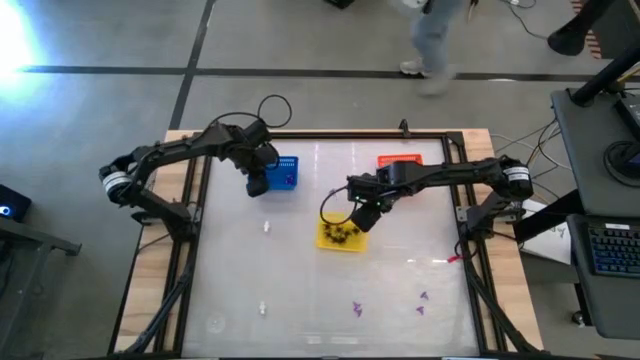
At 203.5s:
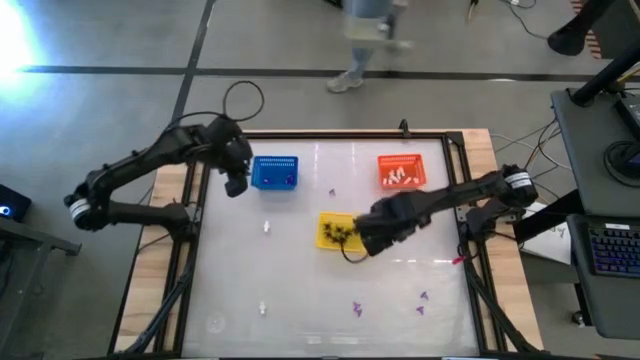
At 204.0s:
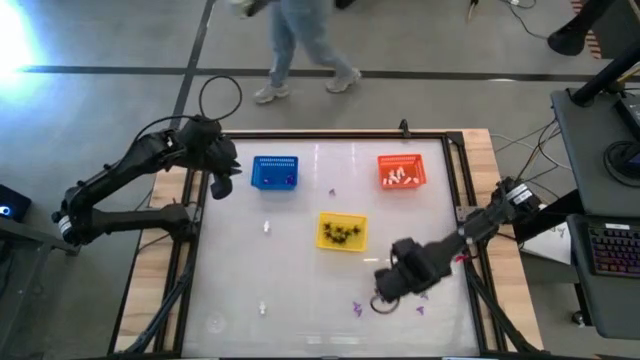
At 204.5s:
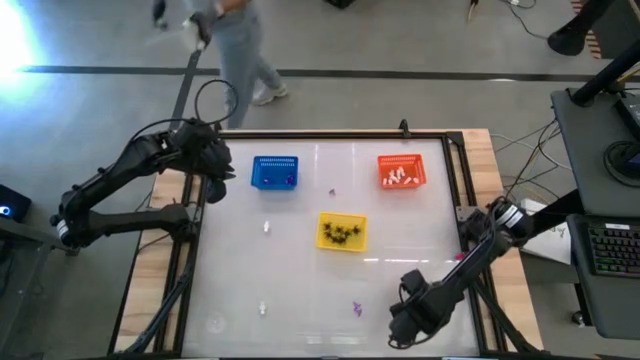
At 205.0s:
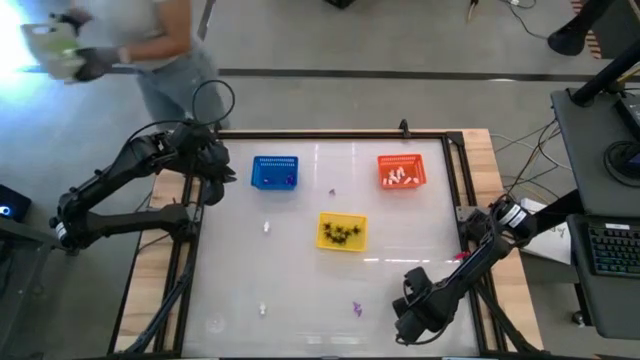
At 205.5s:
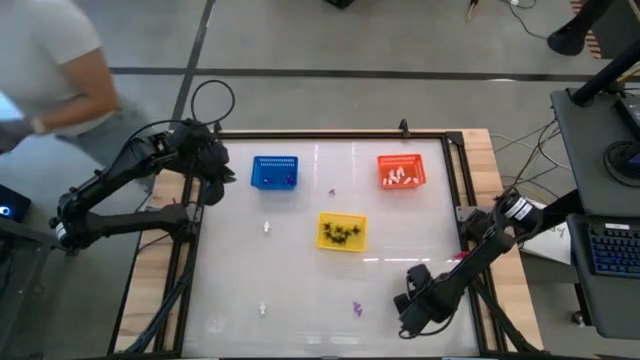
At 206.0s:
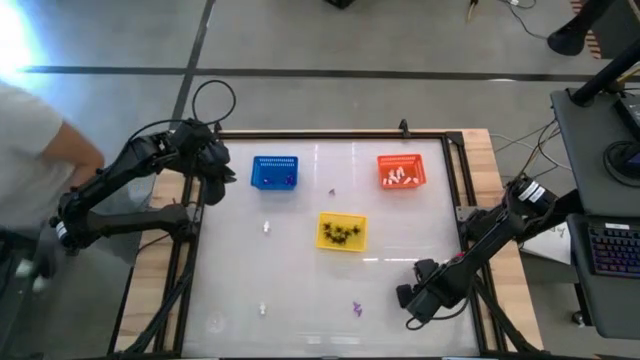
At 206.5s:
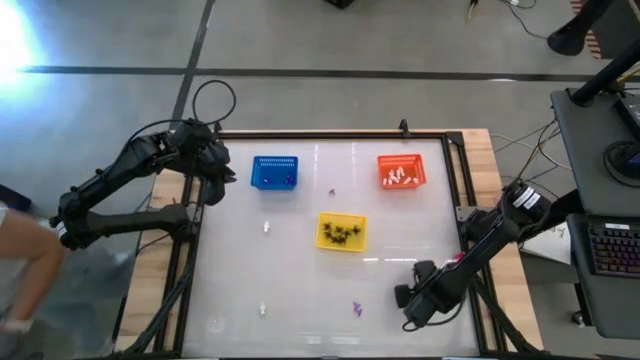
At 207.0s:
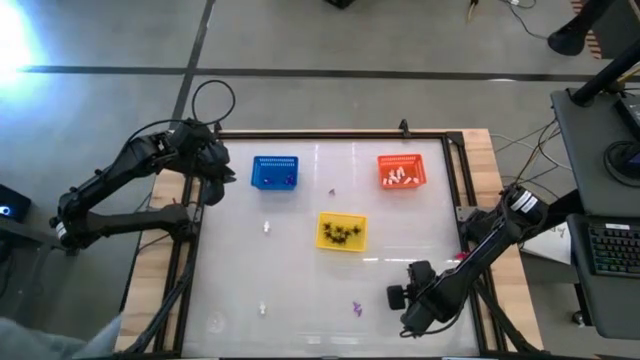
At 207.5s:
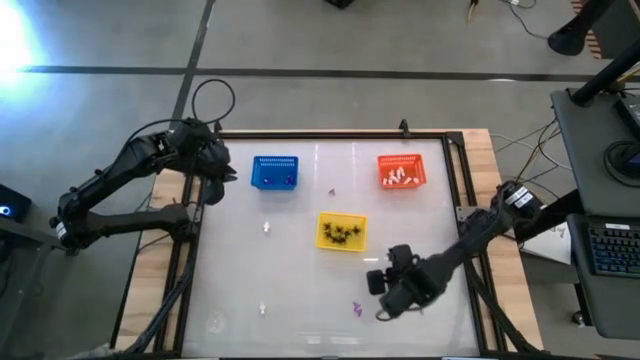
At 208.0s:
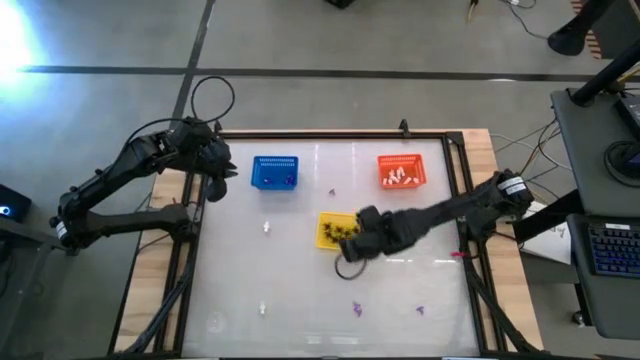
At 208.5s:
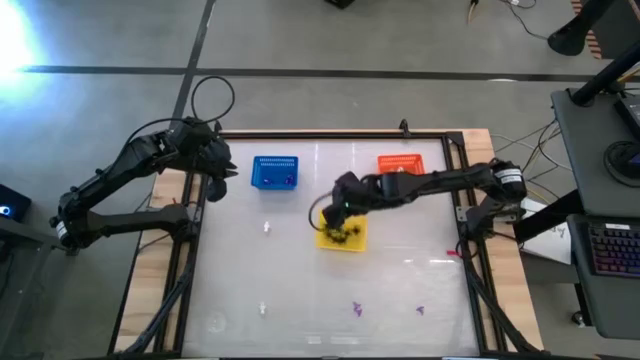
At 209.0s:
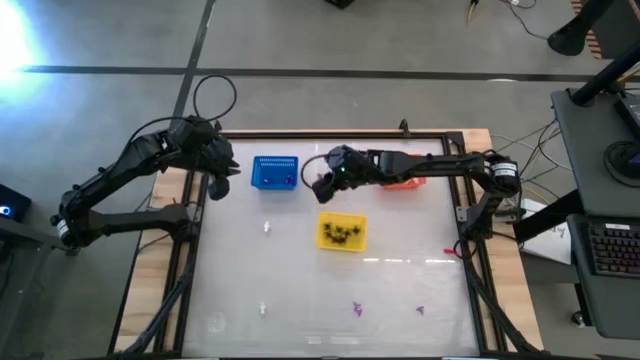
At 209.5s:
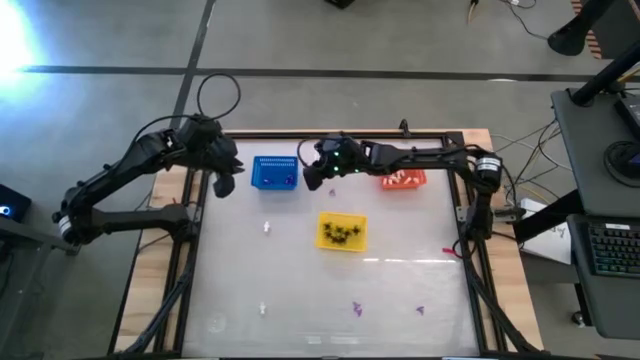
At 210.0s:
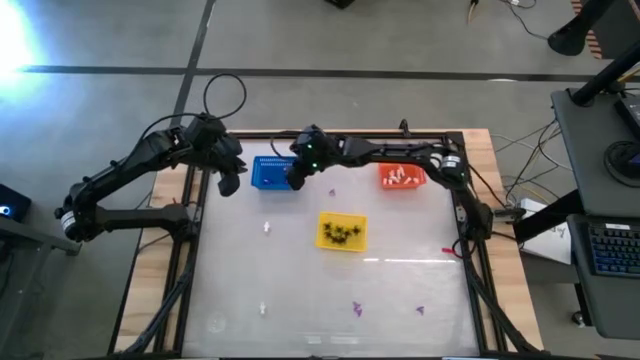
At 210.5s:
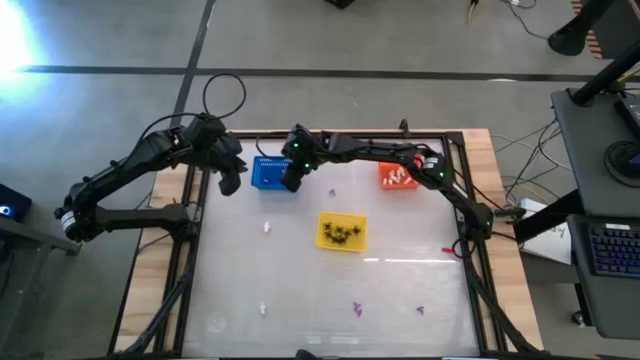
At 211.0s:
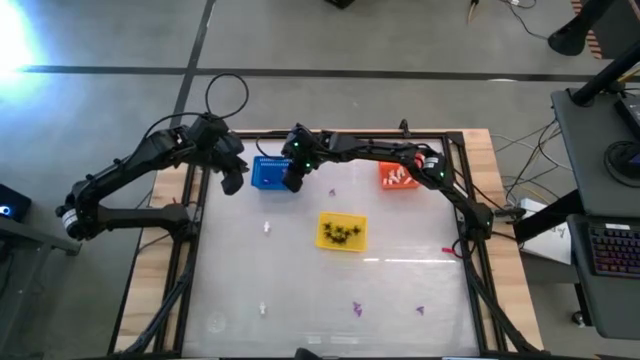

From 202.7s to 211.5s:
Task: Sort Halloween decoration
Put the purple witch hat toy into the blue bin

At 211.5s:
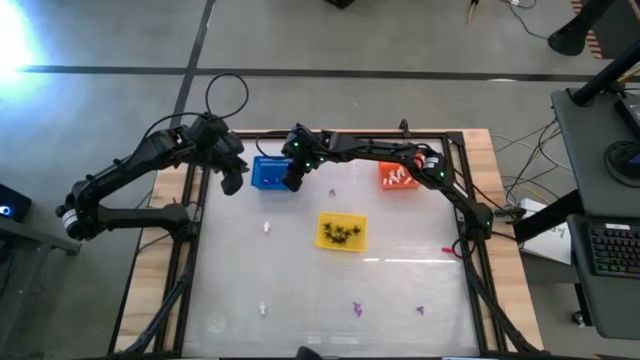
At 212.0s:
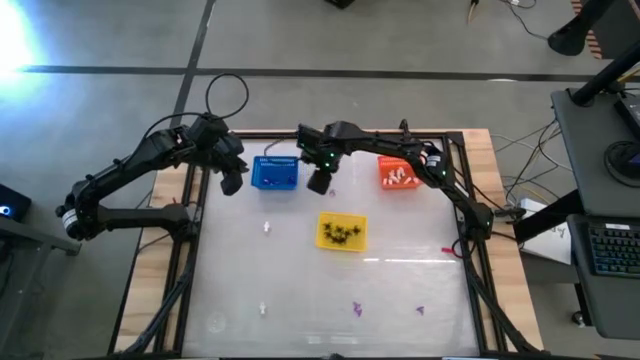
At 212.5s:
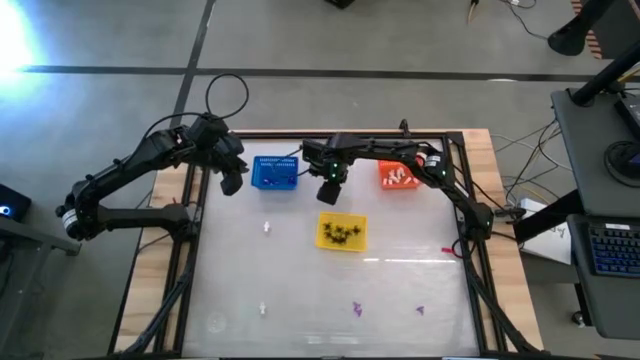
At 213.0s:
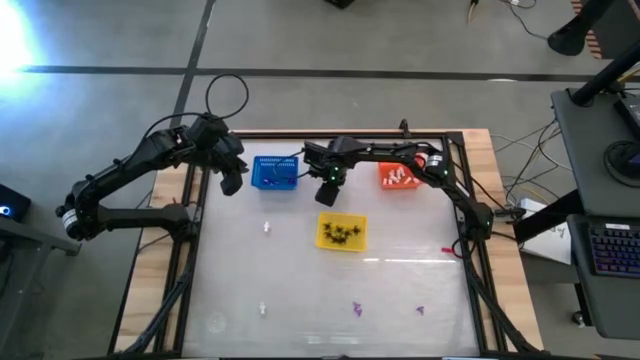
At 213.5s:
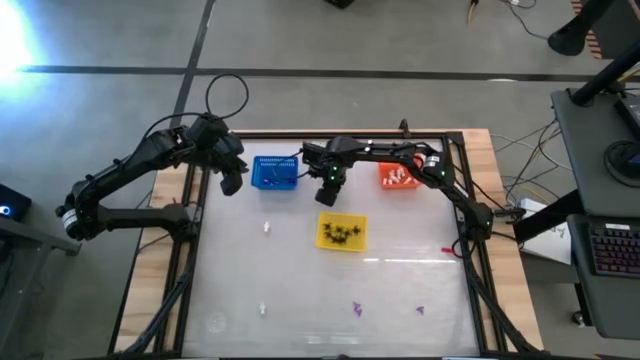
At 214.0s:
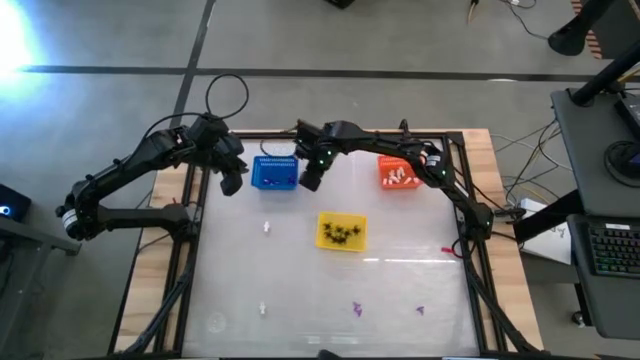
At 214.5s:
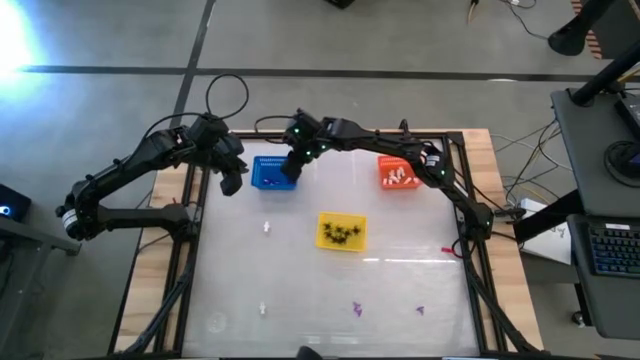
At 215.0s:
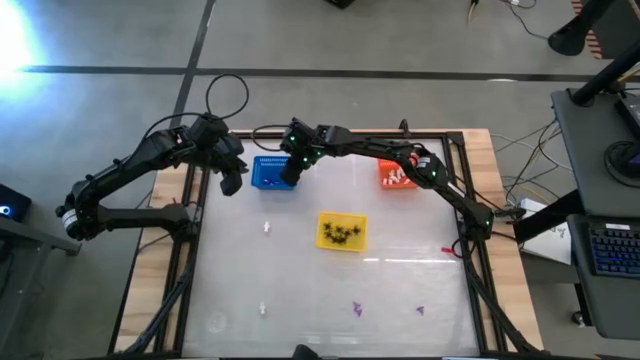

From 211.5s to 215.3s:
Put the purple witch hat toy into the blue bin

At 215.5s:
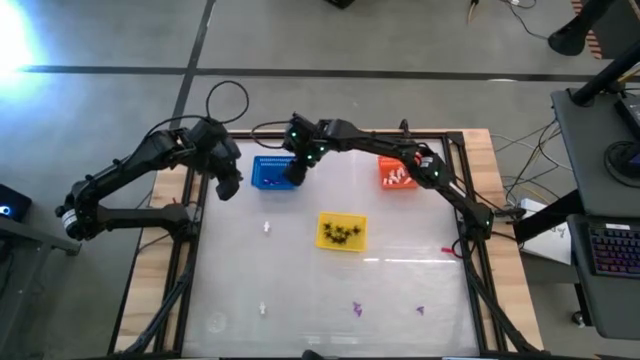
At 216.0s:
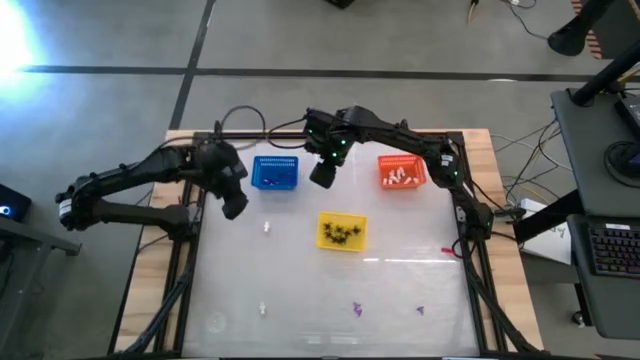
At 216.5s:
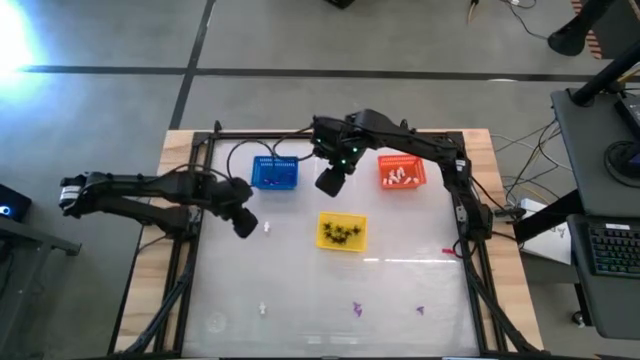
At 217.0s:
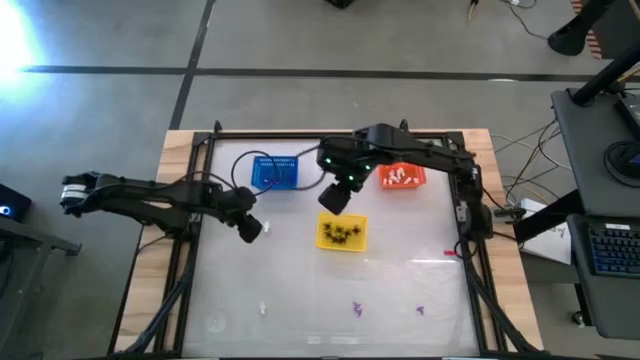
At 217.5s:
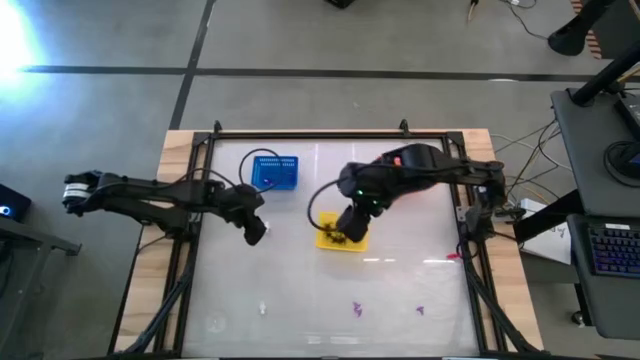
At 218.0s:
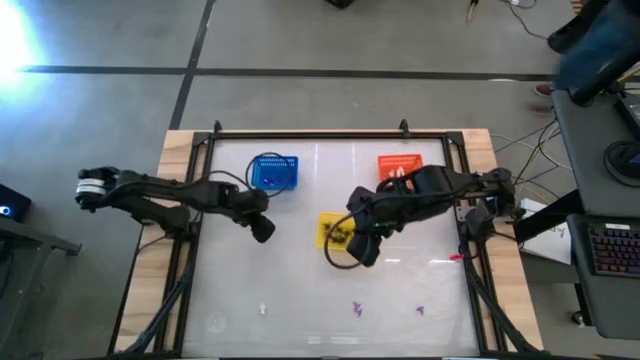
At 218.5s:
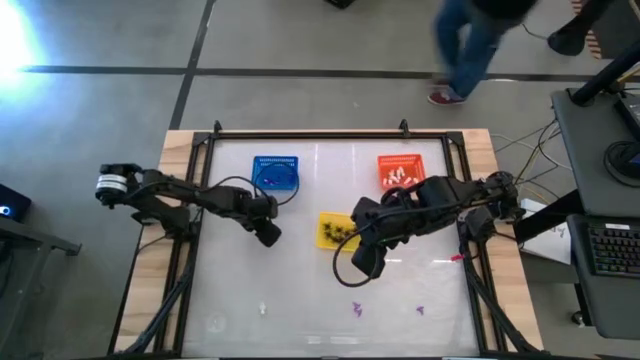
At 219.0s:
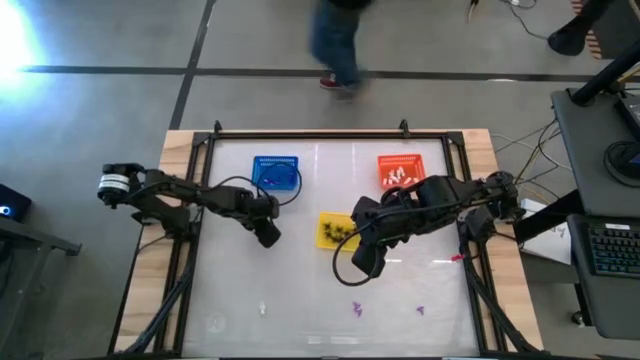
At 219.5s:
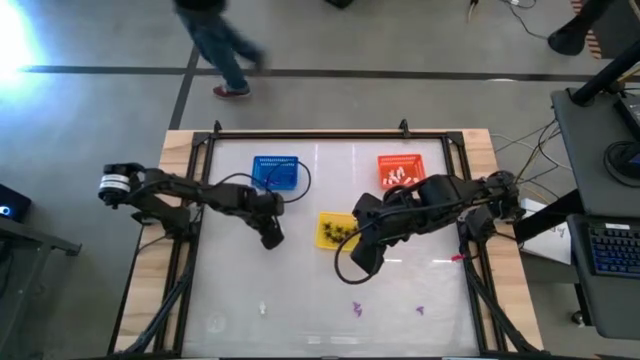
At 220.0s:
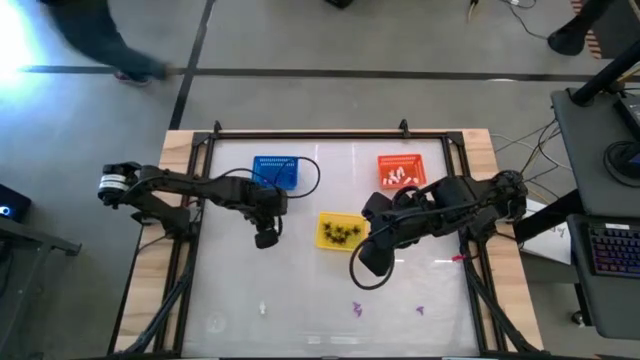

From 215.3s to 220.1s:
Put the white skeleton toy into the orange bin

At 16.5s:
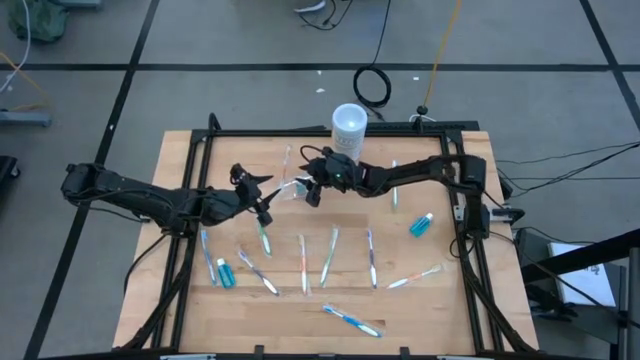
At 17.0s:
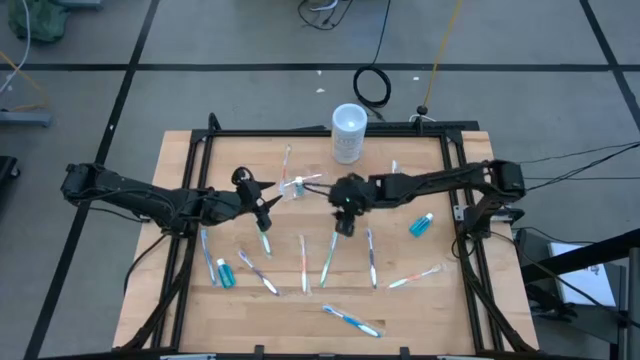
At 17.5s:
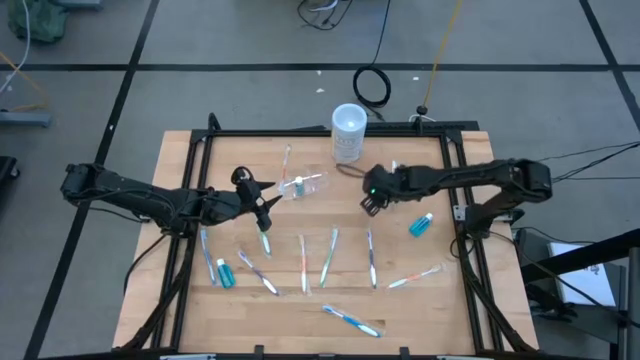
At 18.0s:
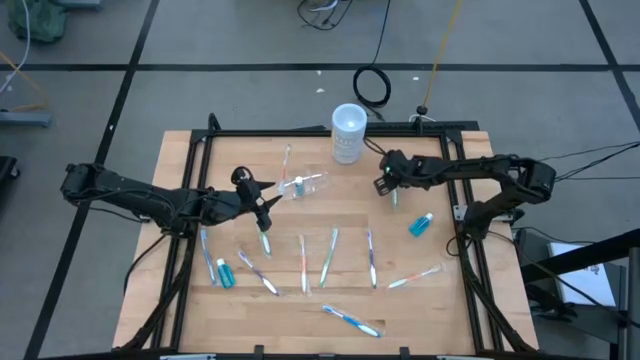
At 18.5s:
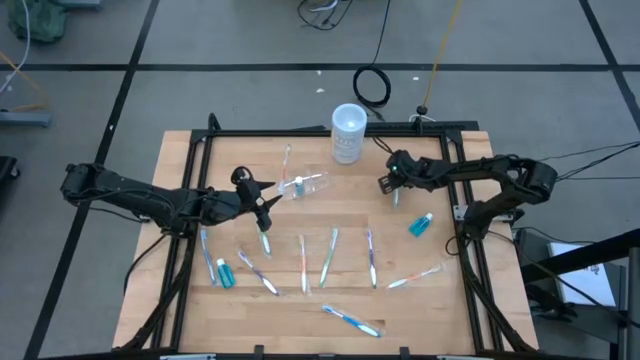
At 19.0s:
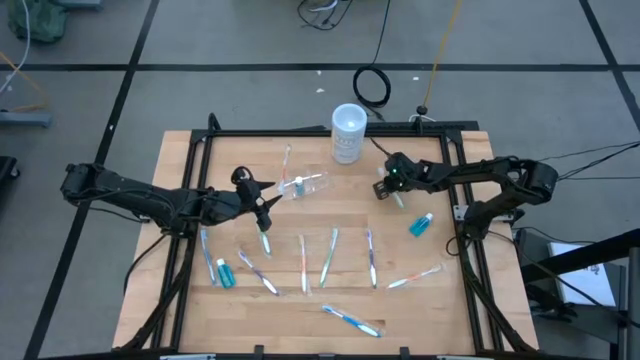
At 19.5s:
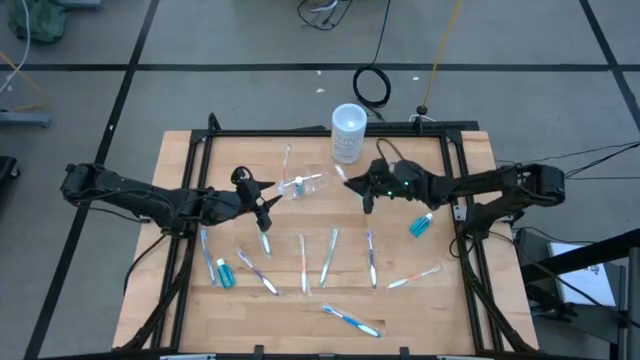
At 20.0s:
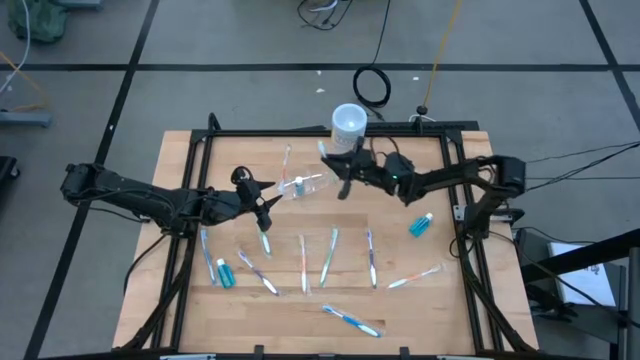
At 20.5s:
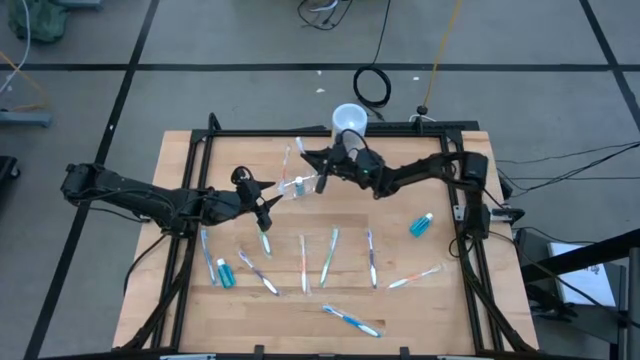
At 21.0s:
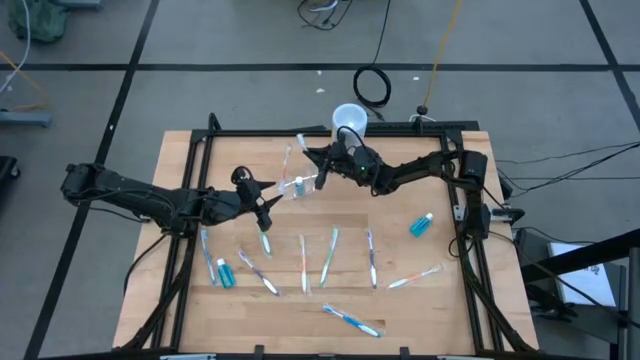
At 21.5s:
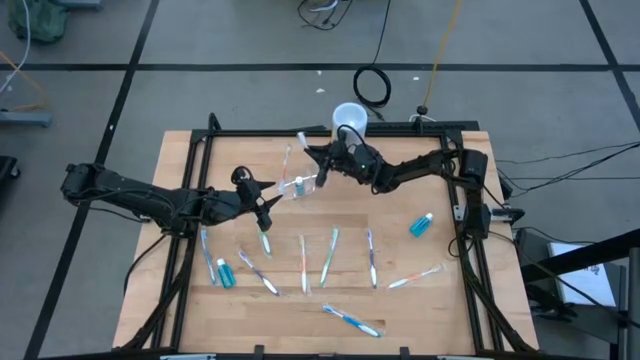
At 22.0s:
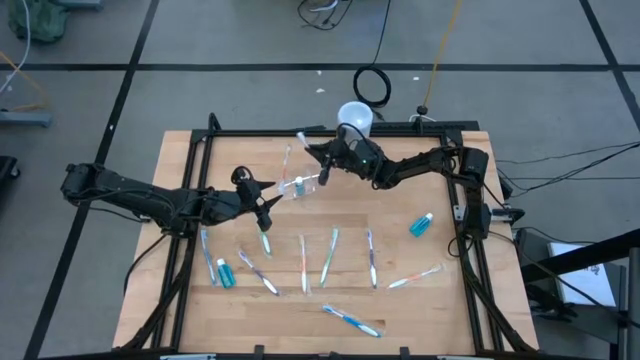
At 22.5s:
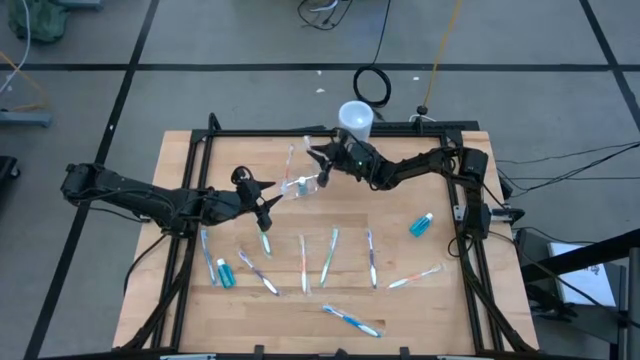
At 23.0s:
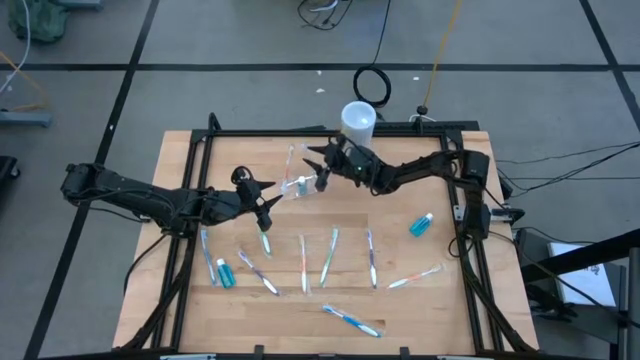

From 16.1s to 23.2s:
Task: Pick & Place toothbrushing station
Put the right green toothbrush into the transparent organizer
